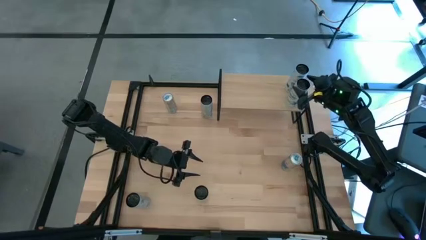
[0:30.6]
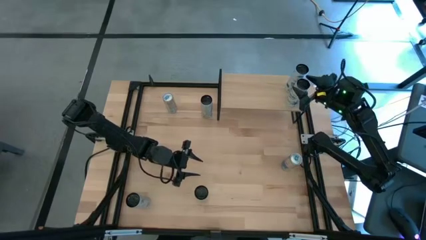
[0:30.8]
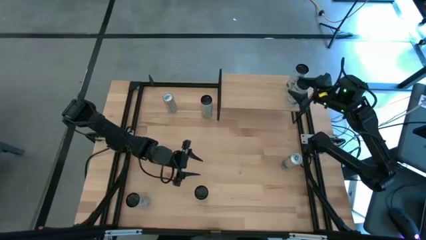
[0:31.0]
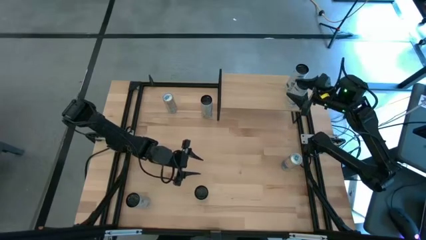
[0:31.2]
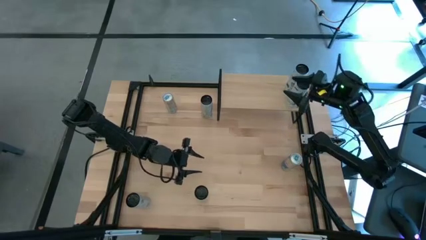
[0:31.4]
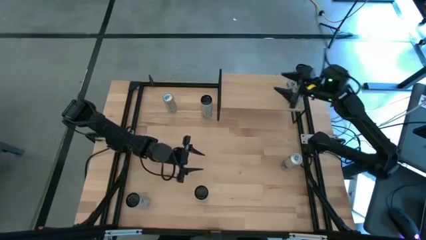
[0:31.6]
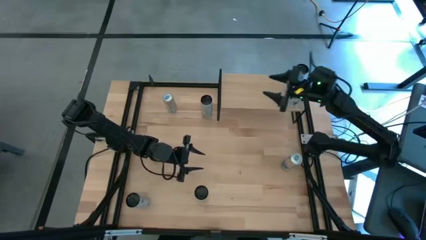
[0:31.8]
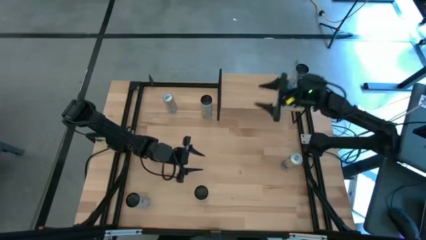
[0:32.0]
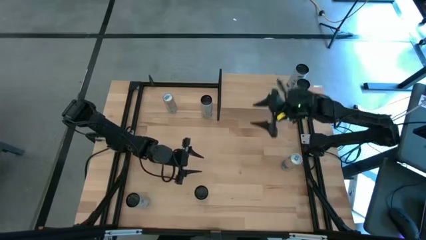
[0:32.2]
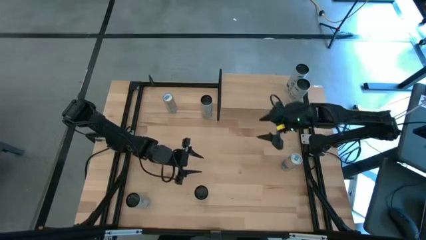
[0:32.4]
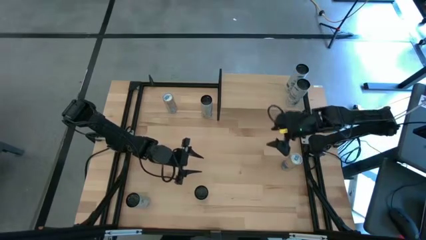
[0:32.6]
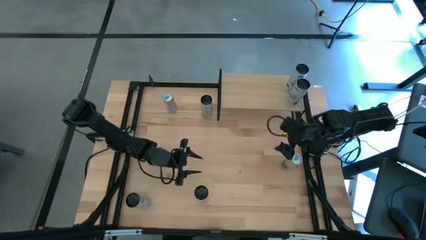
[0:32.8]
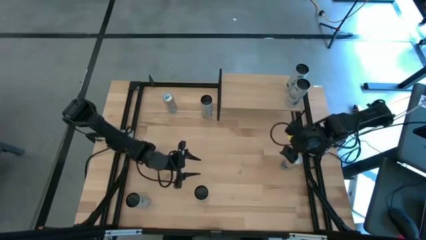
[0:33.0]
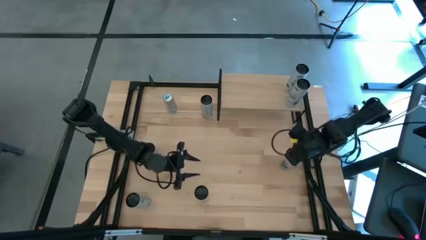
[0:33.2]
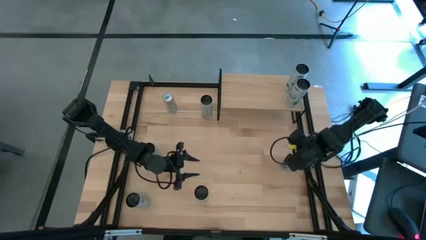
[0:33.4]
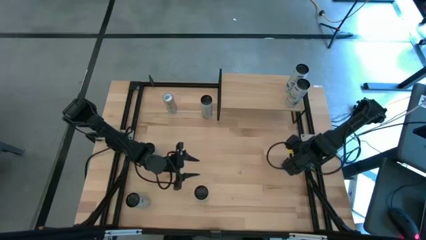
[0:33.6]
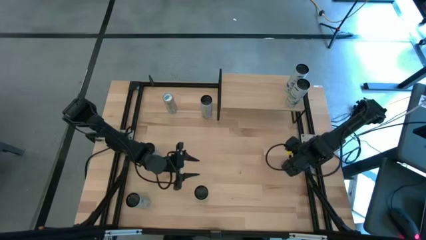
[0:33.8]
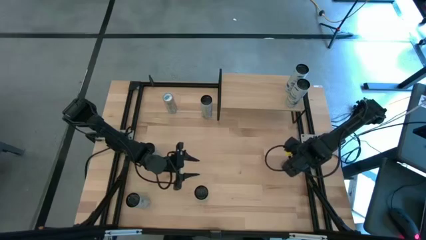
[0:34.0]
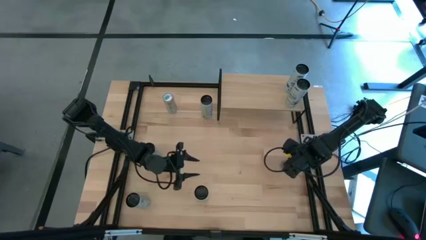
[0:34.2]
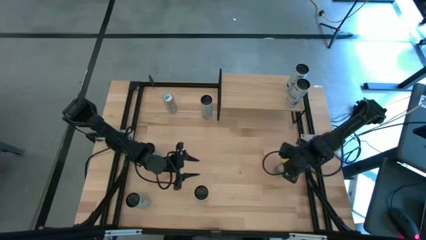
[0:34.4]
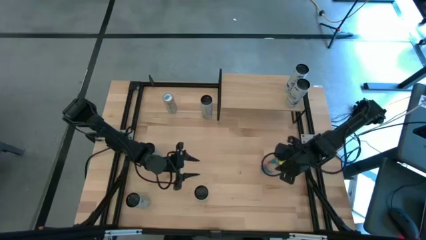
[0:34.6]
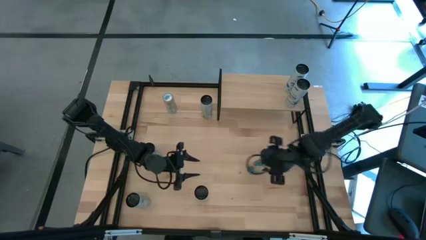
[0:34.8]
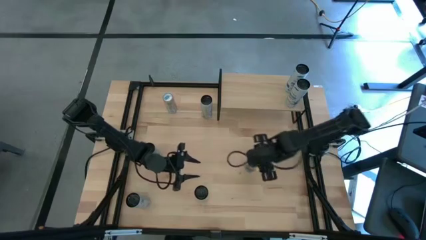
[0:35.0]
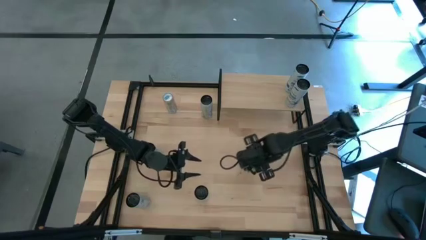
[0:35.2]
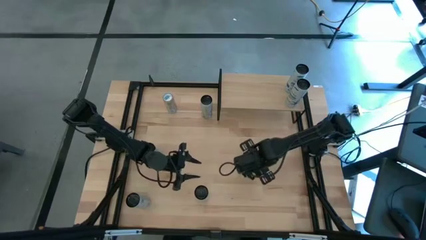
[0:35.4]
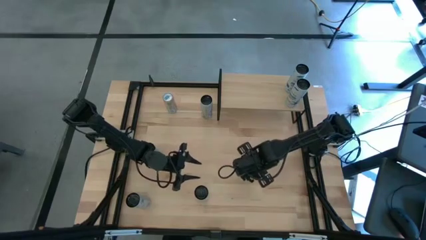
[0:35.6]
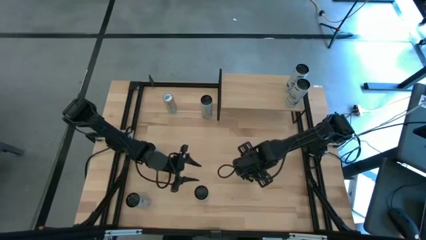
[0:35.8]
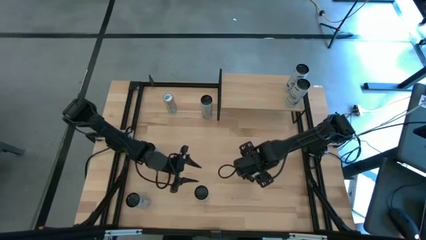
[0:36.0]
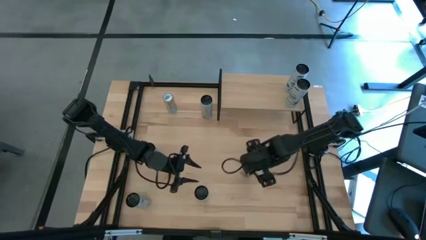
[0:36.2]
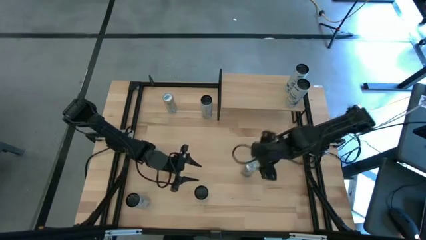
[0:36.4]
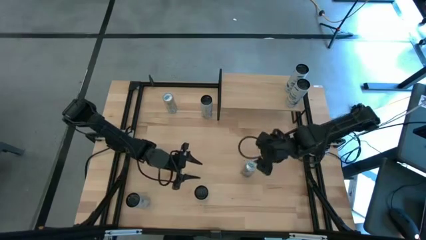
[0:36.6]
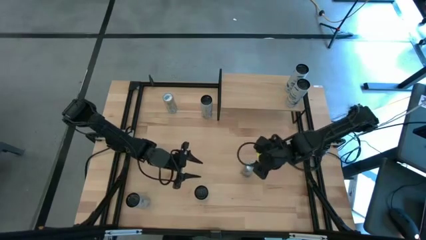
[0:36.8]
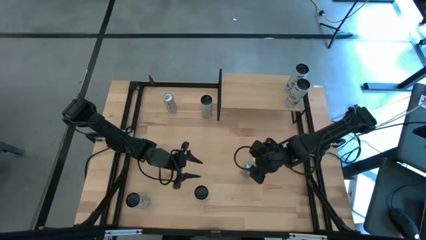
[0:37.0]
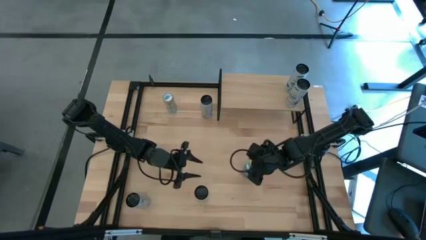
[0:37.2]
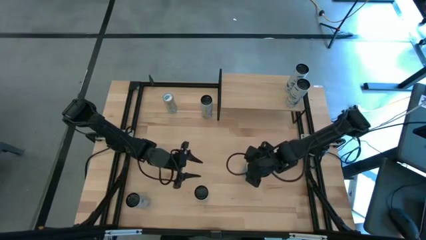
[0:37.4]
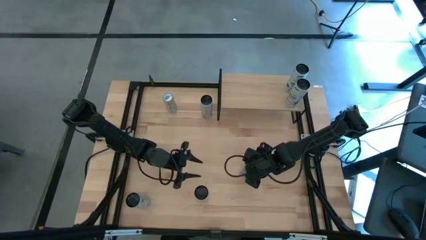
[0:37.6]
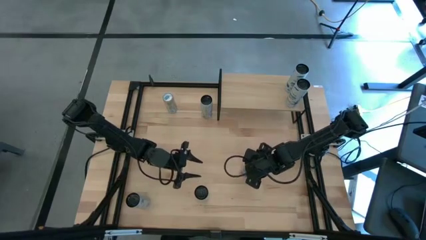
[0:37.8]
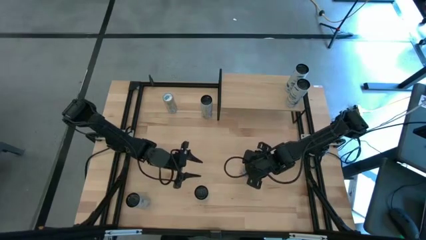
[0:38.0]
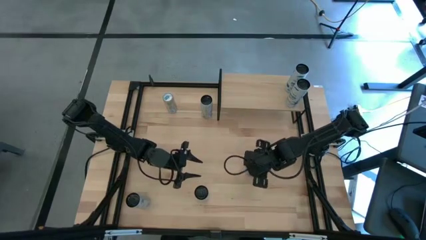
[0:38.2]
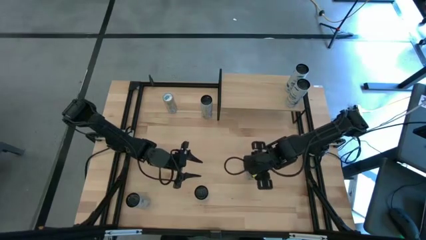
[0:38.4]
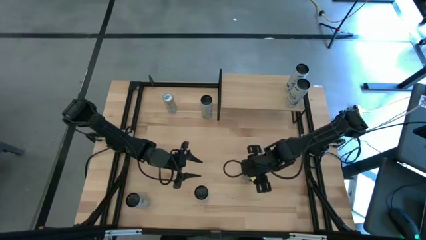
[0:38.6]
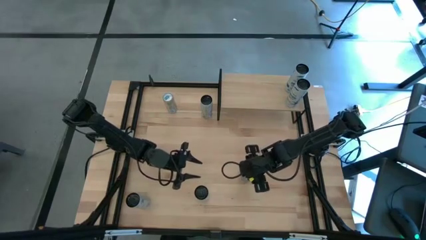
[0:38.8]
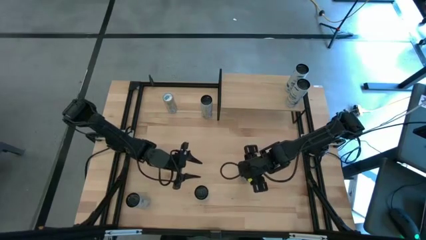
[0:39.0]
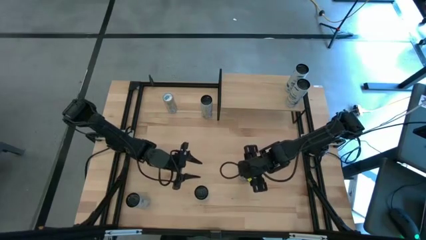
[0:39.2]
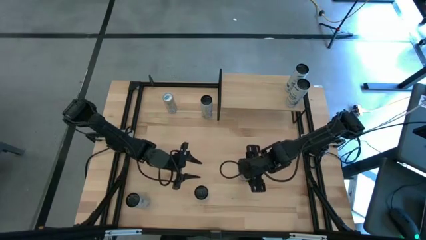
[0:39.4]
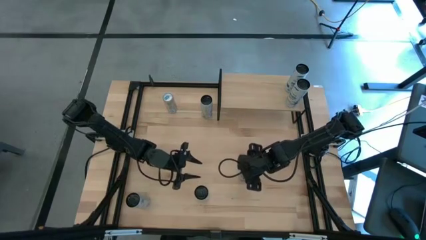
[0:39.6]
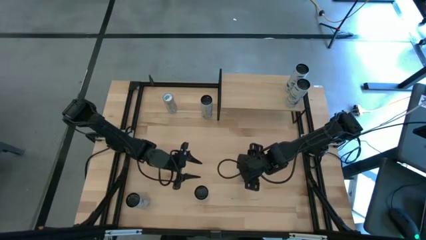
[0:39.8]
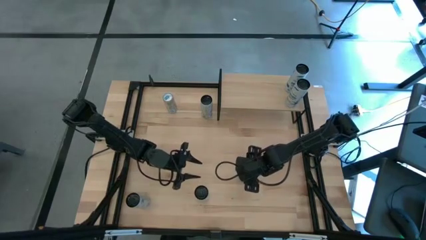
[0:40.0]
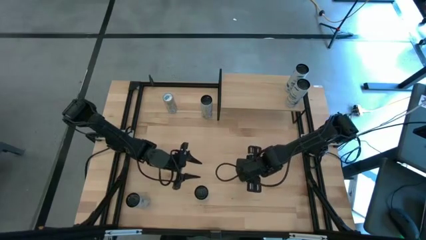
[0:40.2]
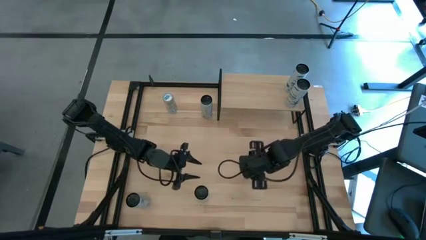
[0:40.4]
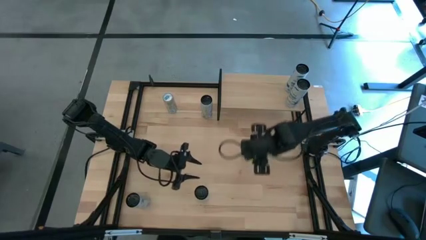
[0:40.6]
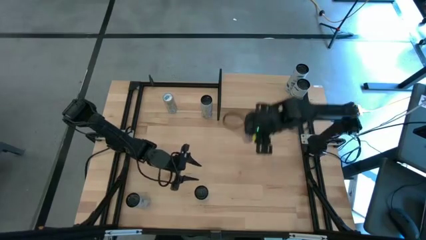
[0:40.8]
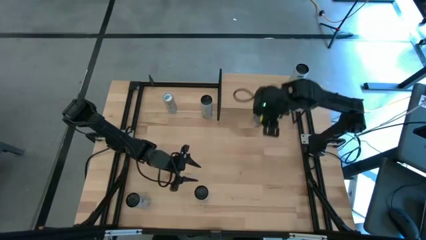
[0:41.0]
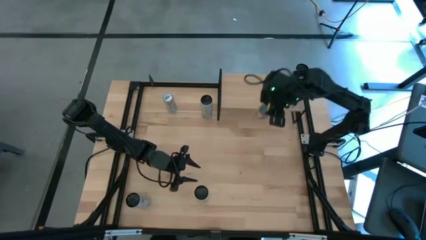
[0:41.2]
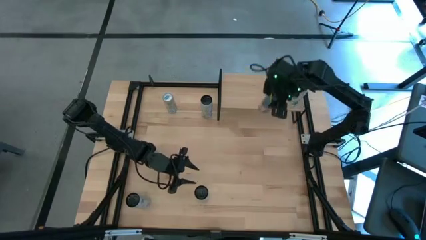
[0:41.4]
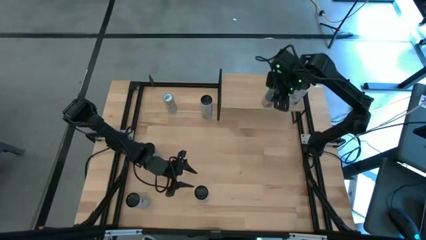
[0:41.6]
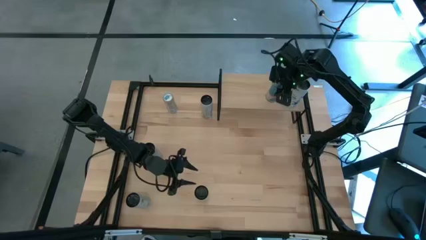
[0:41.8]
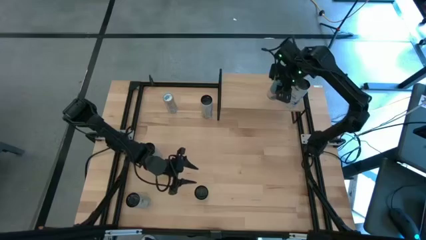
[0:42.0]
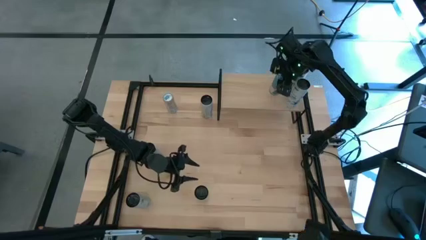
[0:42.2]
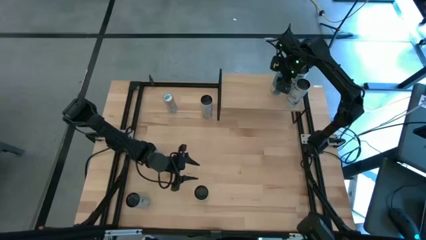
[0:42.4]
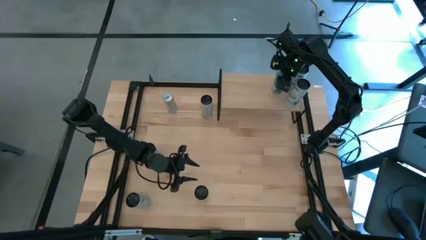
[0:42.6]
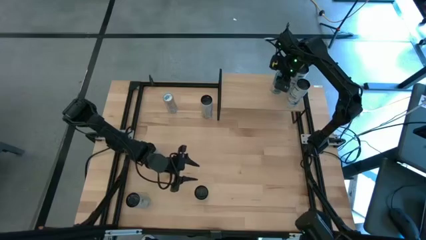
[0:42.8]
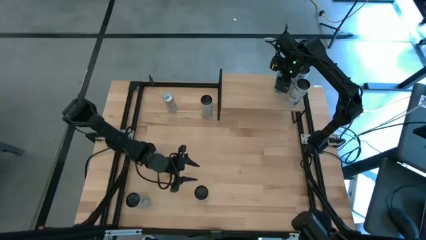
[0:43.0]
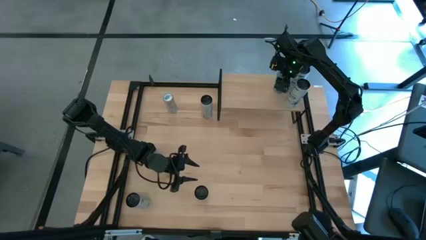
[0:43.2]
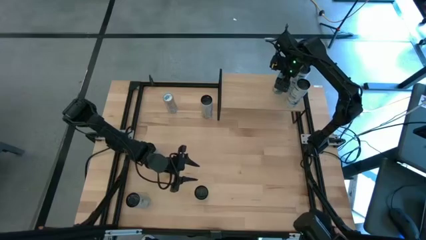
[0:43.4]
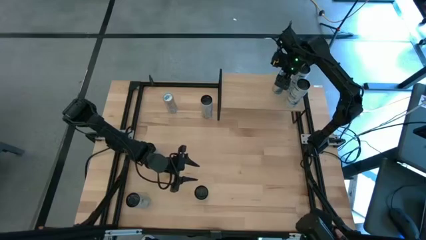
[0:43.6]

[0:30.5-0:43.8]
Task: Place canned beverage on shelf
Put the blue soda can on the shelf
